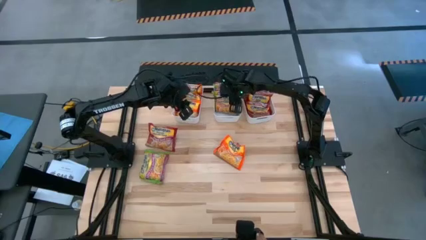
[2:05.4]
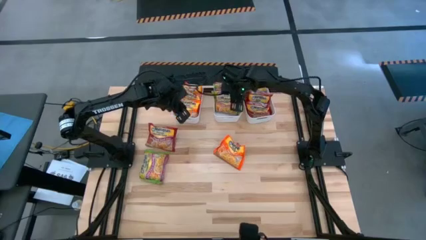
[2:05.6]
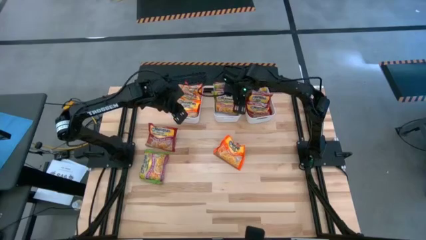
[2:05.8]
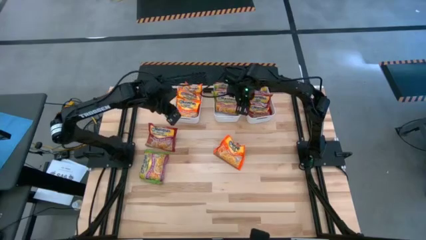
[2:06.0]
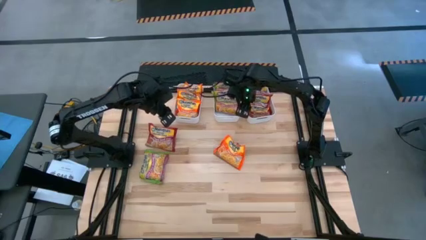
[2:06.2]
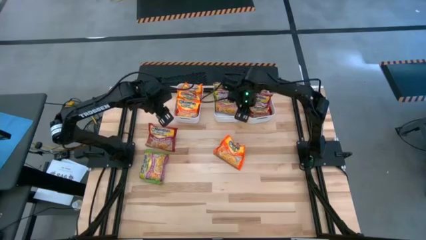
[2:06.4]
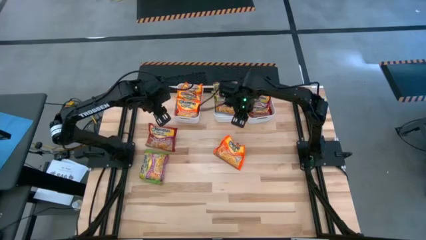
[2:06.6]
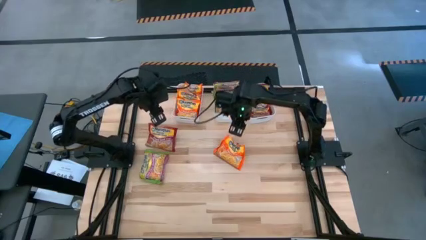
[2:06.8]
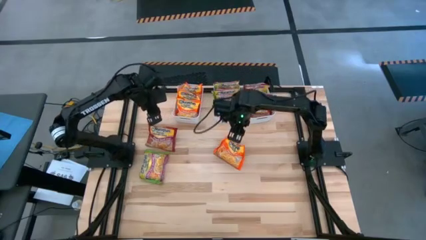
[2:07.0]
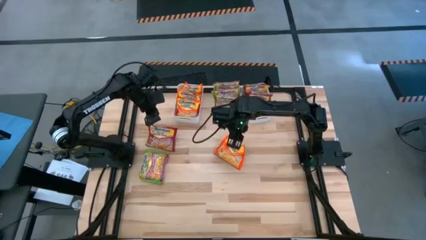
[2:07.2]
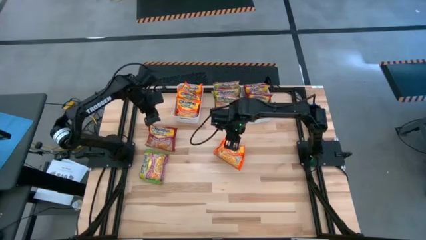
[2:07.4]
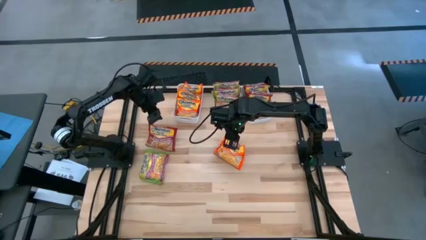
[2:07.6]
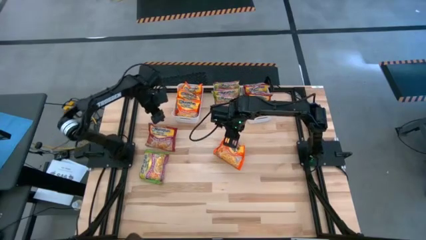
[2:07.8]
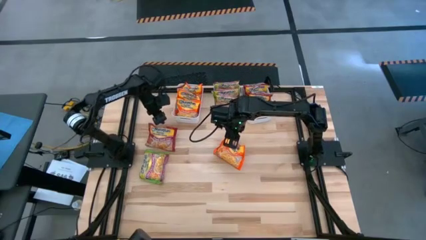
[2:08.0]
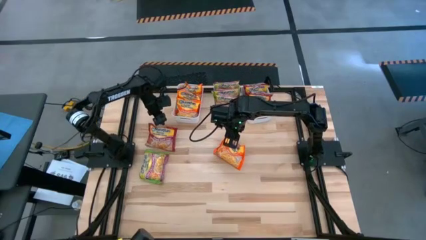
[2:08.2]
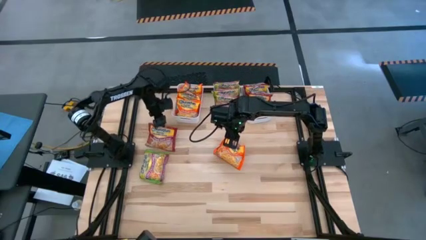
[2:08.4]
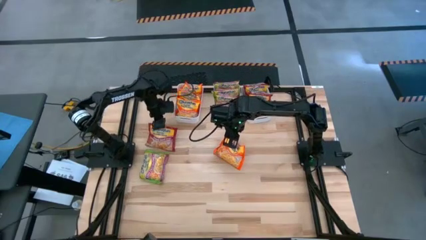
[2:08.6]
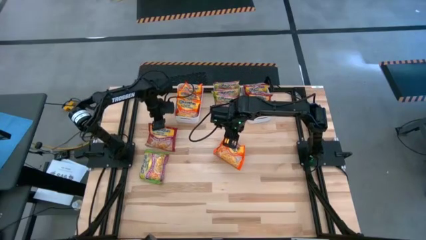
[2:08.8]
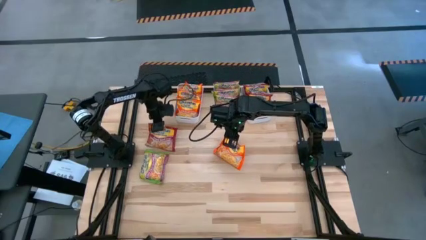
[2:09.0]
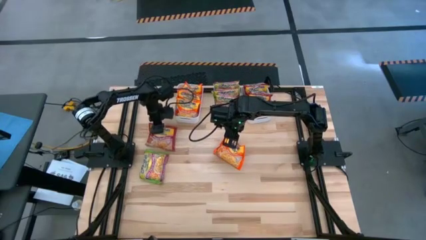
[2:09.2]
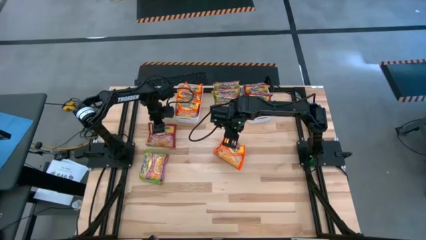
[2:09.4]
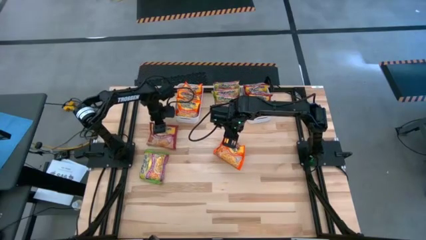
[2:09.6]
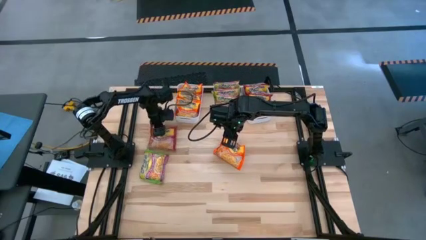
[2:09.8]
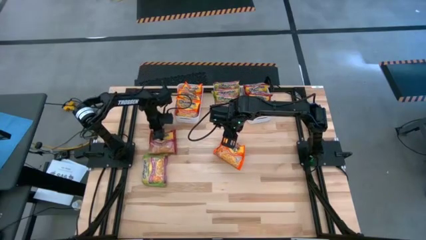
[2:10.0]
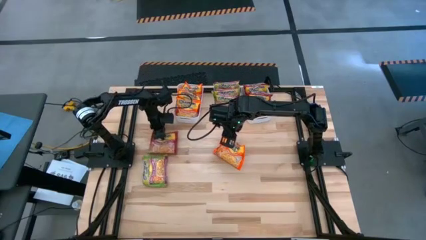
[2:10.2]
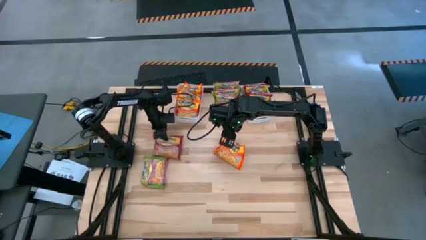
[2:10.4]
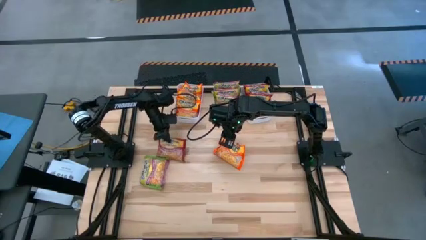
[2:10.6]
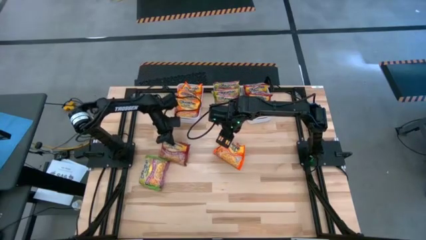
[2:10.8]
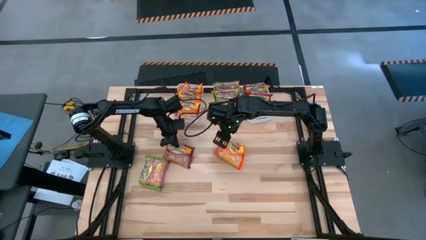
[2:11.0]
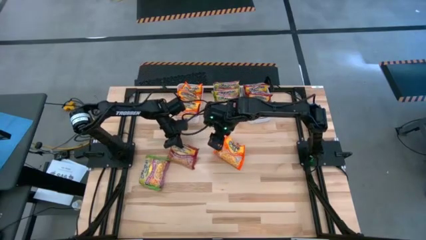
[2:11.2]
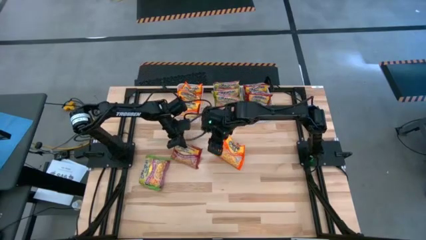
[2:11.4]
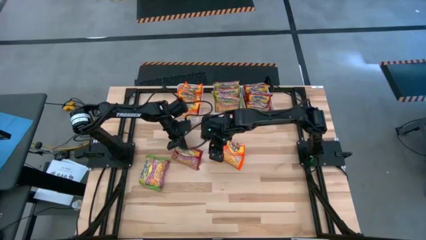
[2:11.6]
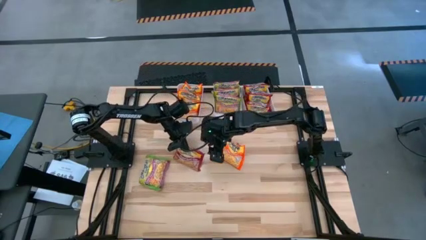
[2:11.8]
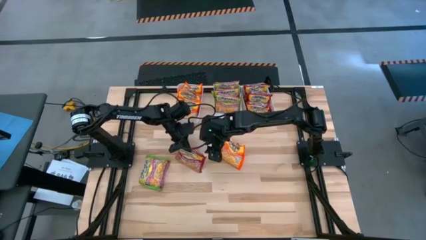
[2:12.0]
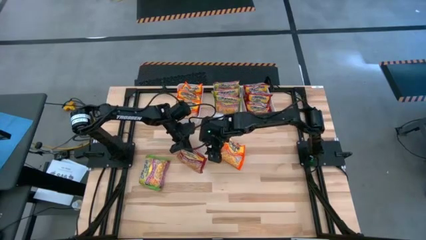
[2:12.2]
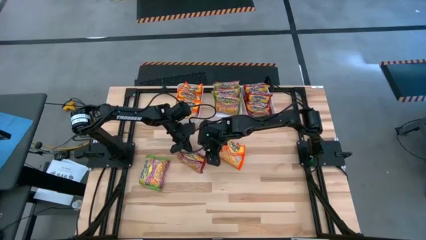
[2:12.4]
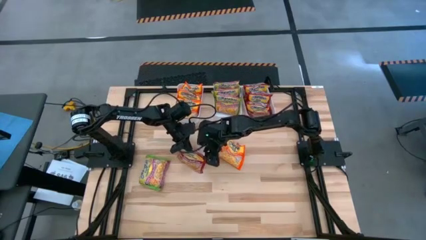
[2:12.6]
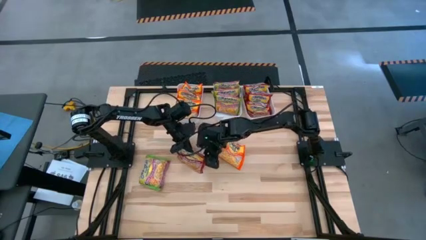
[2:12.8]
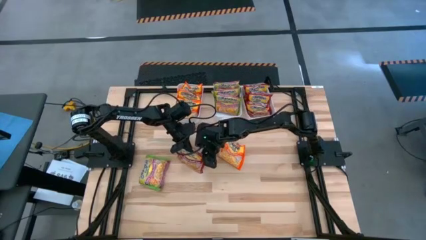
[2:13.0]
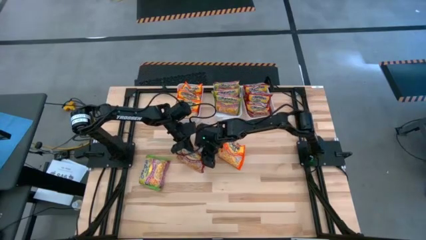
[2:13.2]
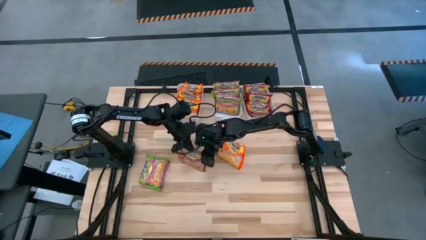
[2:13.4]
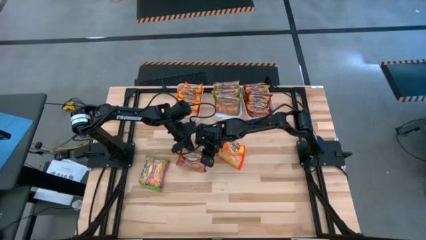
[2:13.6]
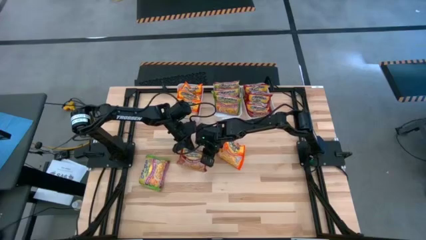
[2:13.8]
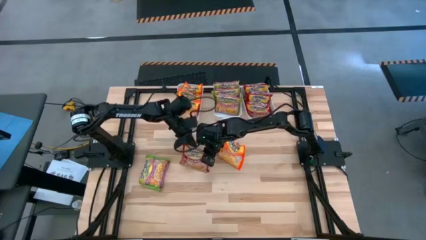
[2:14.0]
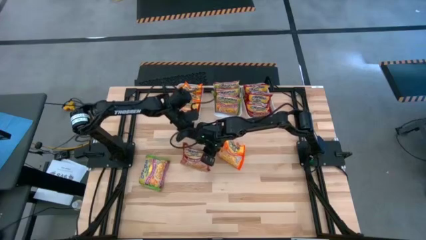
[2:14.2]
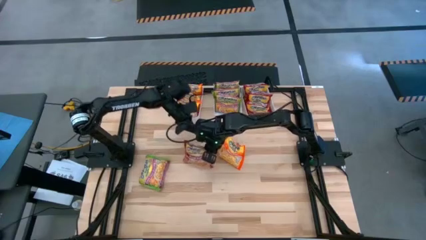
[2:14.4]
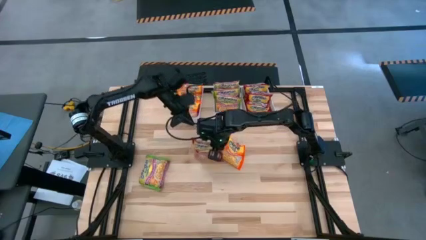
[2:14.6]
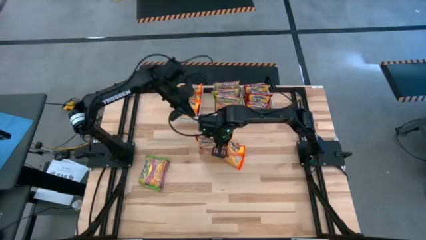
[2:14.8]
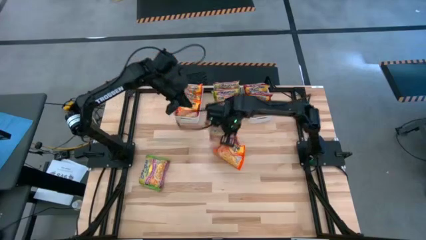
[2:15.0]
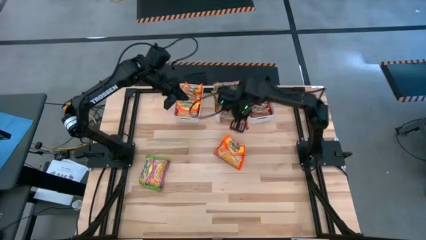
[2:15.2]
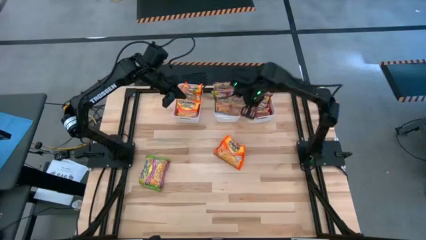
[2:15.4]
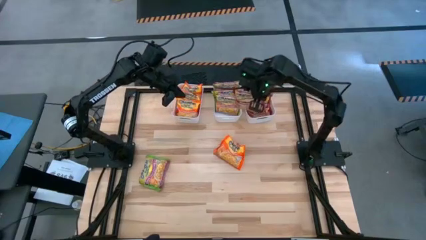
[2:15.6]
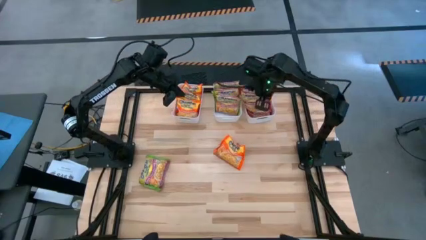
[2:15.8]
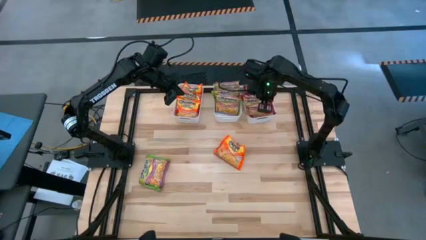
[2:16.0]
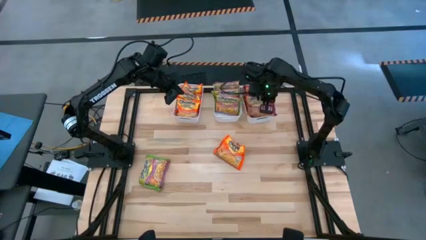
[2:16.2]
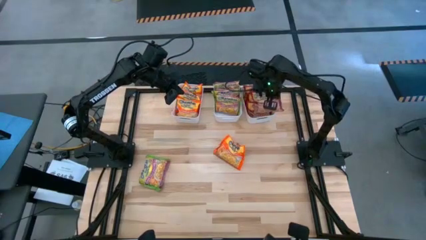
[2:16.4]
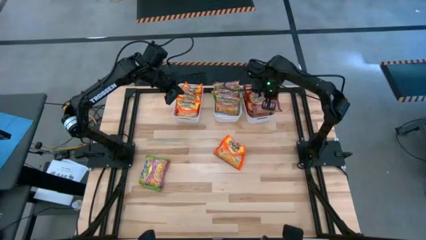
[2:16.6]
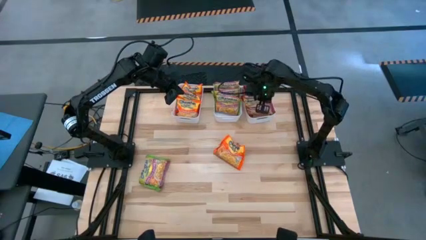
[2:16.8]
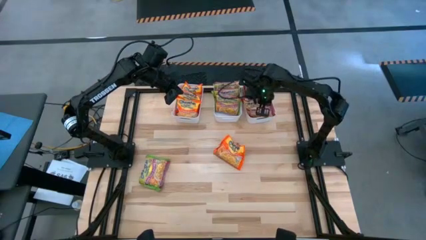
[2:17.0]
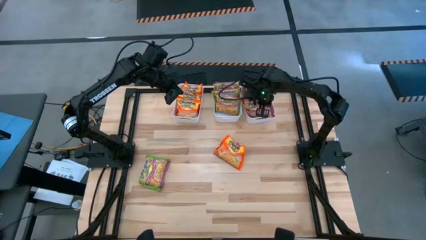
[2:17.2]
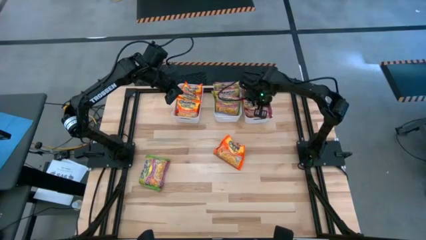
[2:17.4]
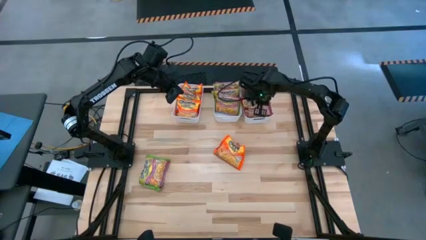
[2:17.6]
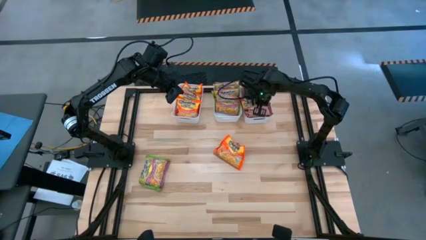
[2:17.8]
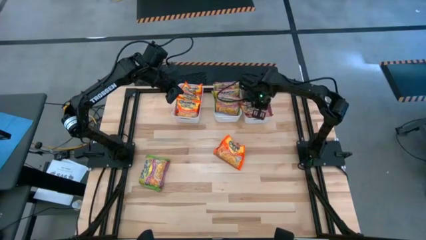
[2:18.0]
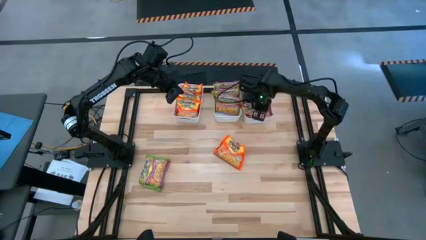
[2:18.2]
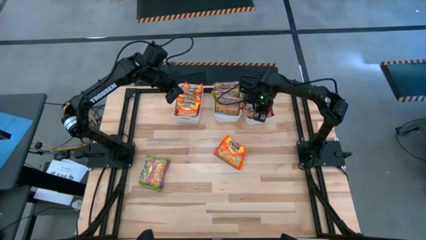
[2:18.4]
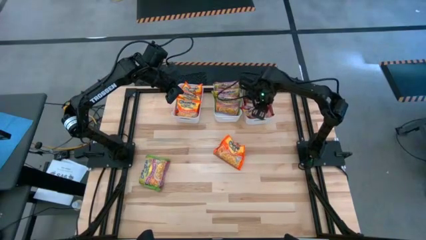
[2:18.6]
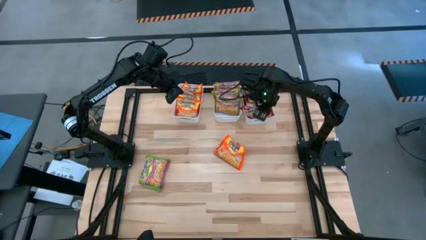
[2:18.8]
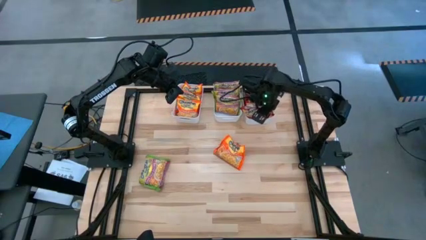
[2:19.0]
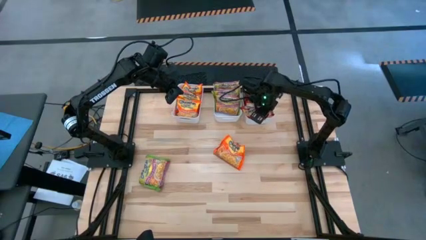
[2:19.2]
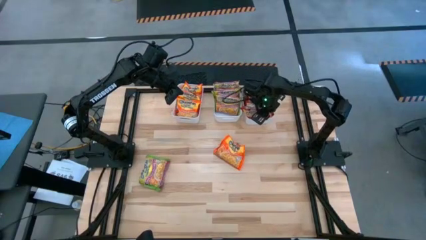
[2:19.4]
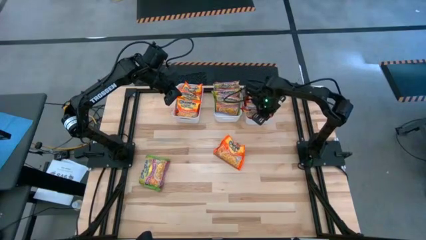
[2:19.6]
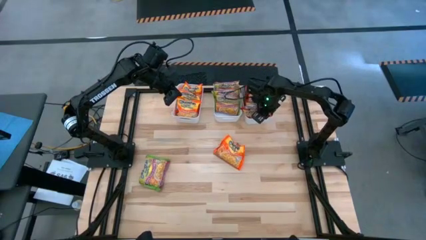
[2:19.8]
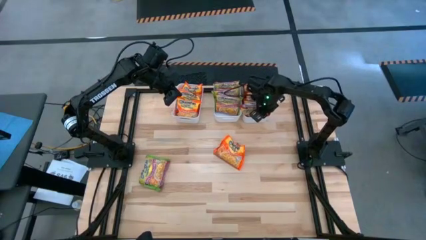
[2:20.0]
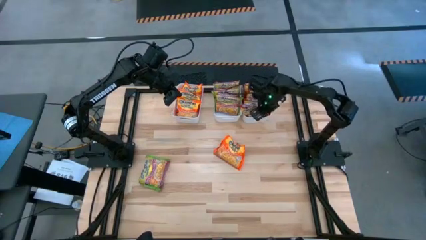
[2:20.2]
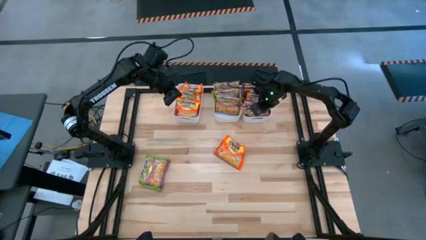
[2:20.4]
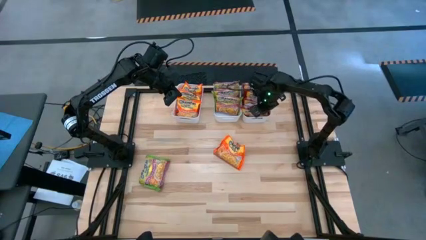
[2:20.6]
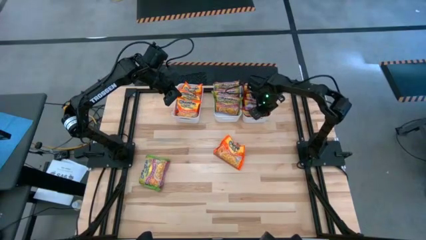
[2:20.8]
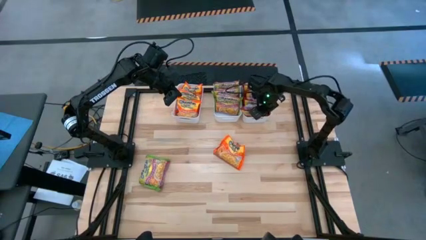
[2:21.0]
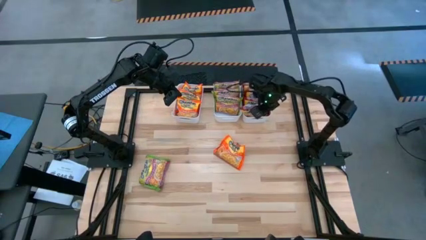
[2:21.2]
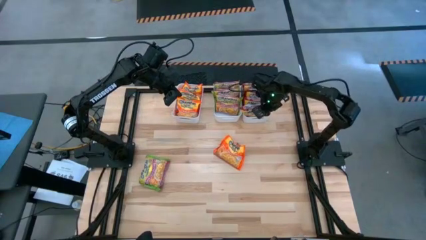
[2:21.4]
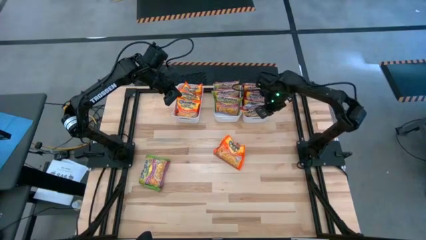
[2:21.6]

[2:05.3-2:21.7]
Task: Sort Maruchan noodles
Put the red noodle pack into the right white bin
